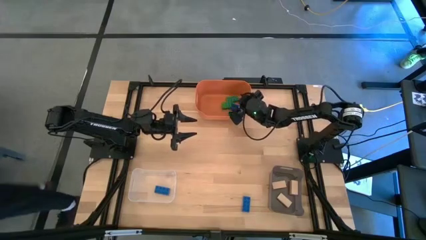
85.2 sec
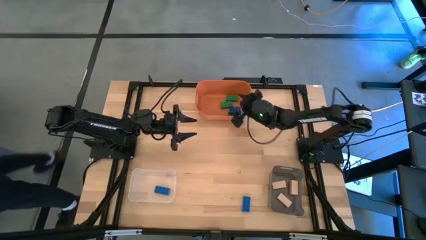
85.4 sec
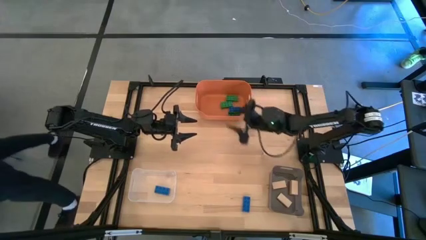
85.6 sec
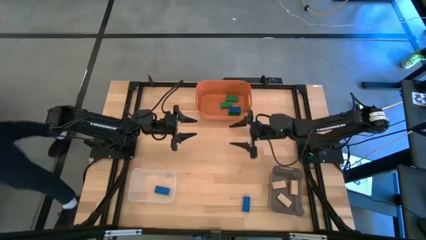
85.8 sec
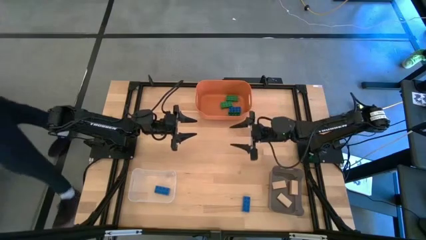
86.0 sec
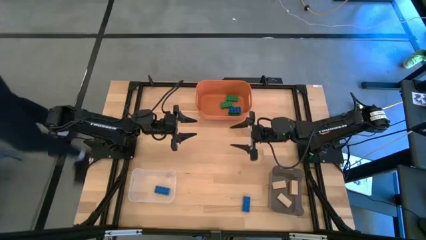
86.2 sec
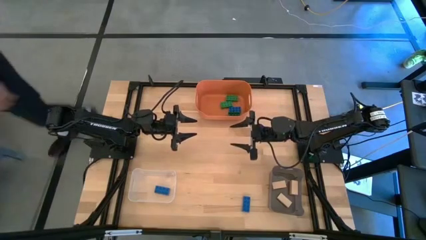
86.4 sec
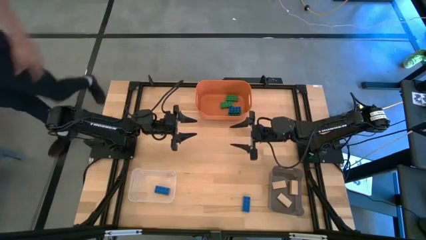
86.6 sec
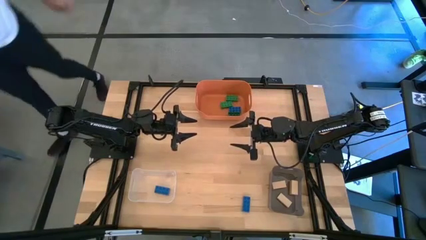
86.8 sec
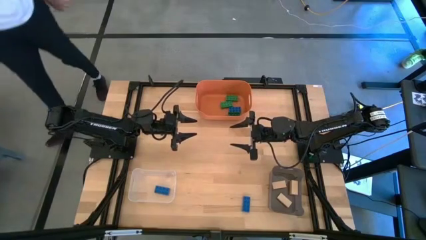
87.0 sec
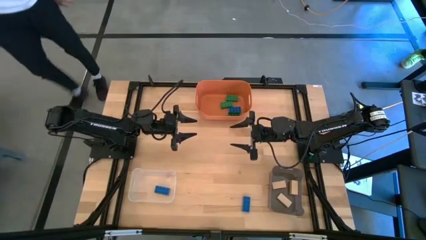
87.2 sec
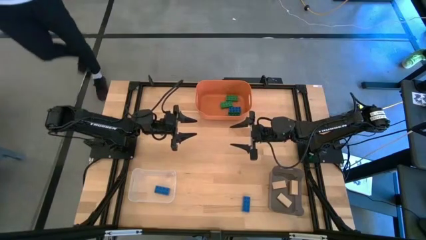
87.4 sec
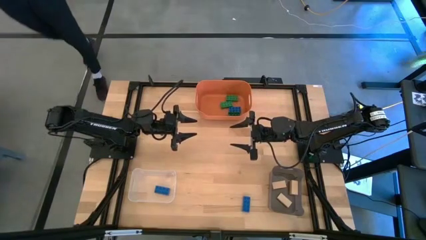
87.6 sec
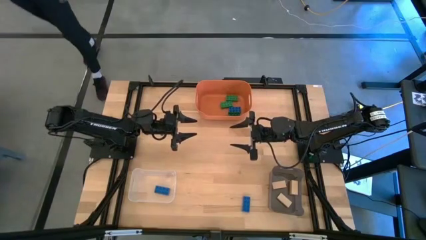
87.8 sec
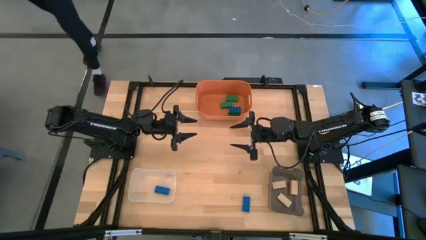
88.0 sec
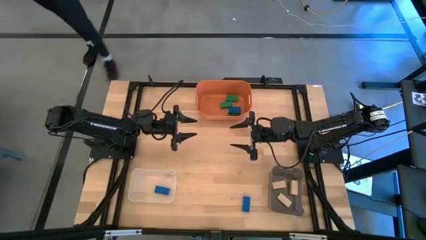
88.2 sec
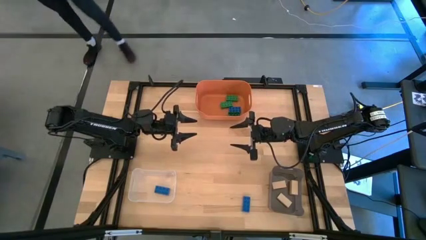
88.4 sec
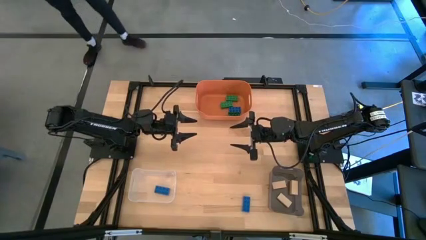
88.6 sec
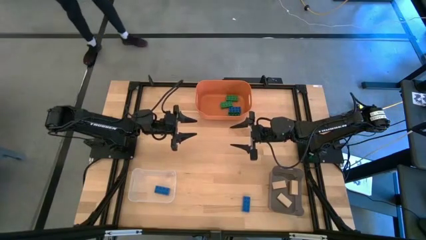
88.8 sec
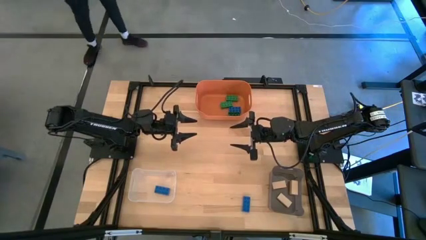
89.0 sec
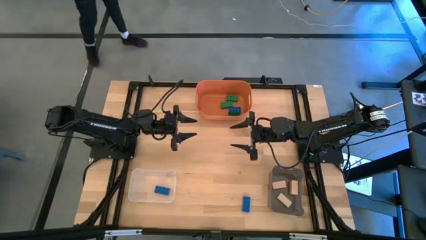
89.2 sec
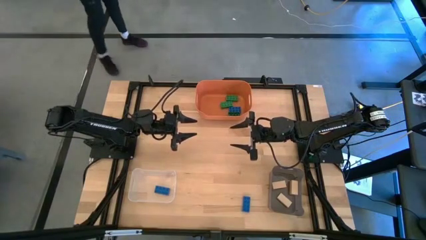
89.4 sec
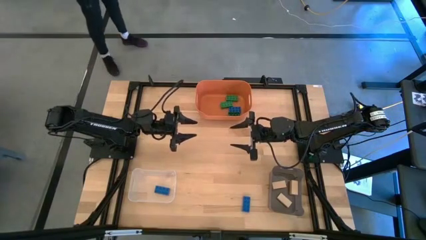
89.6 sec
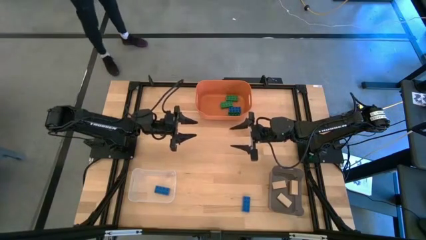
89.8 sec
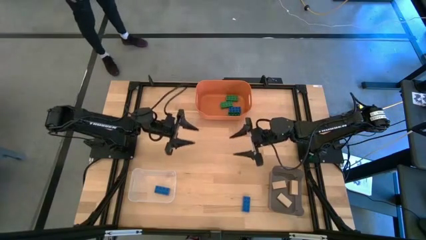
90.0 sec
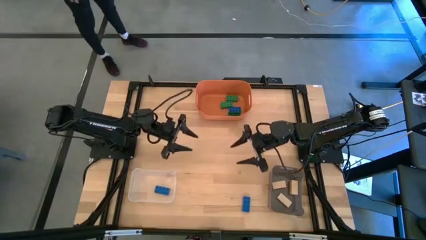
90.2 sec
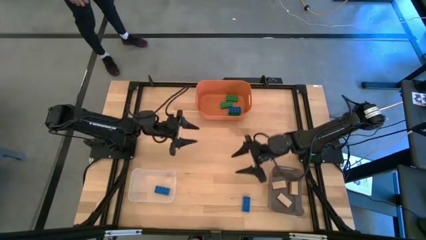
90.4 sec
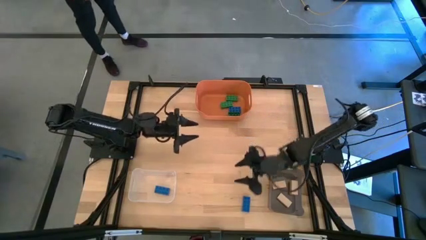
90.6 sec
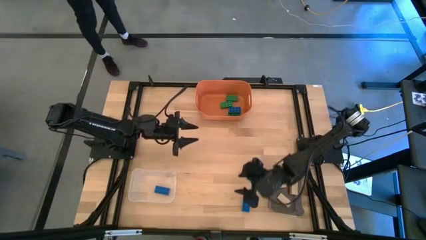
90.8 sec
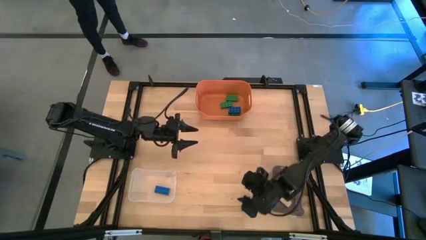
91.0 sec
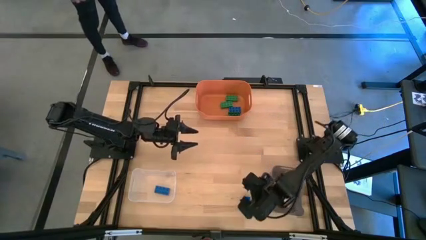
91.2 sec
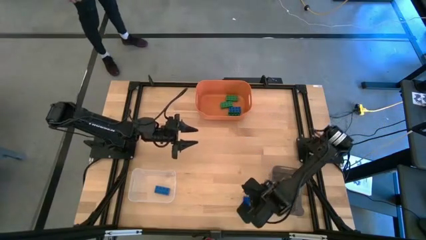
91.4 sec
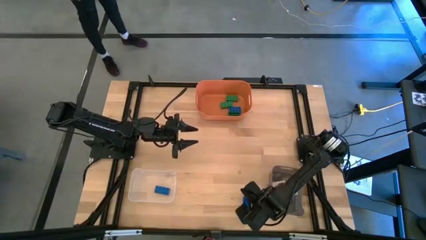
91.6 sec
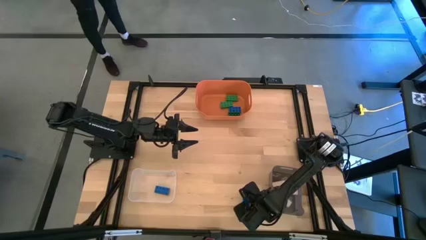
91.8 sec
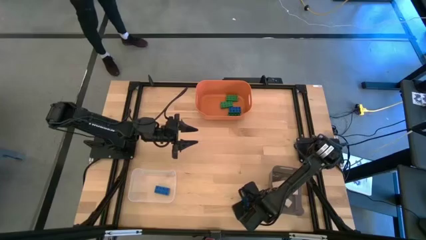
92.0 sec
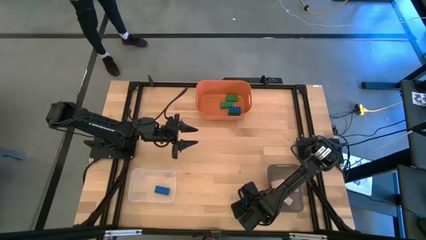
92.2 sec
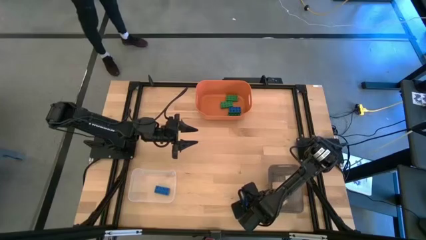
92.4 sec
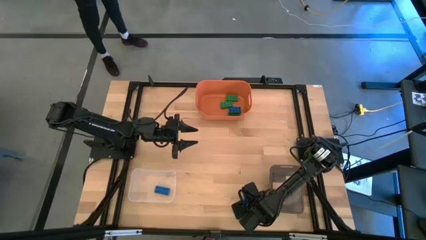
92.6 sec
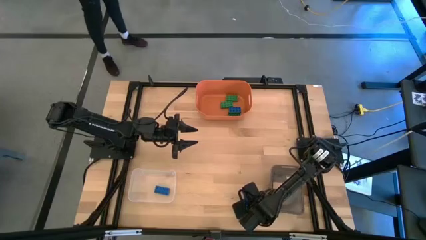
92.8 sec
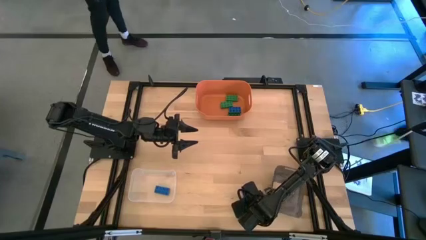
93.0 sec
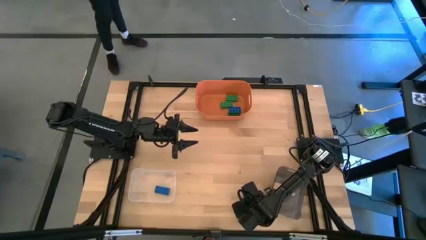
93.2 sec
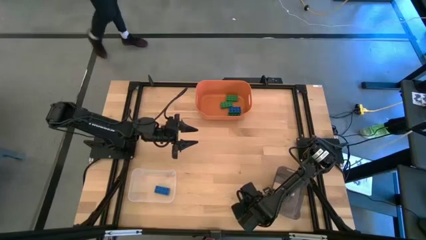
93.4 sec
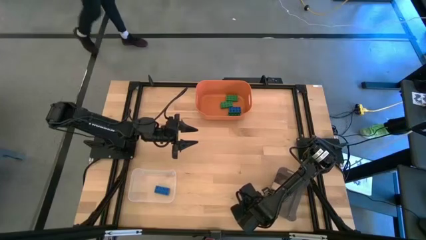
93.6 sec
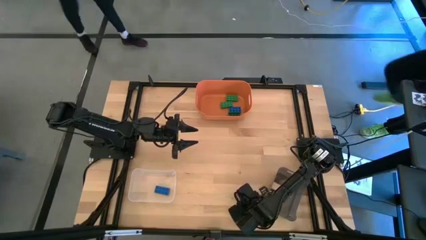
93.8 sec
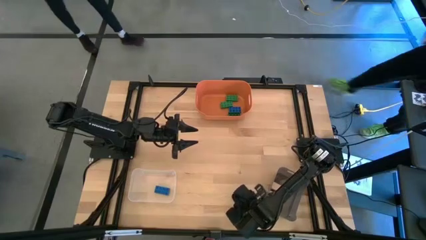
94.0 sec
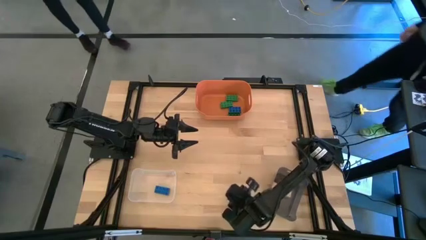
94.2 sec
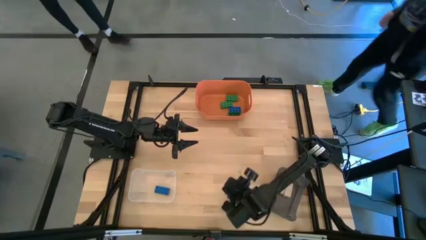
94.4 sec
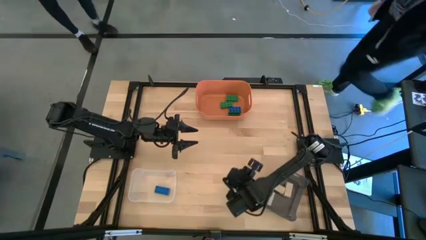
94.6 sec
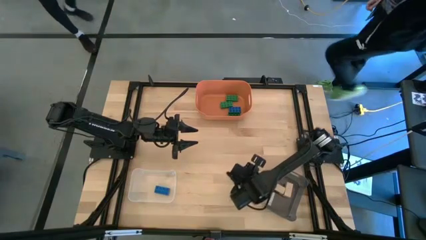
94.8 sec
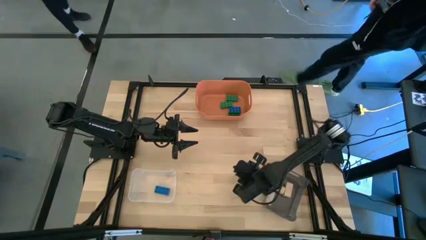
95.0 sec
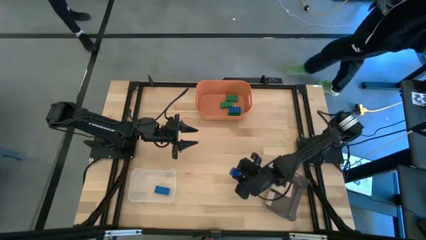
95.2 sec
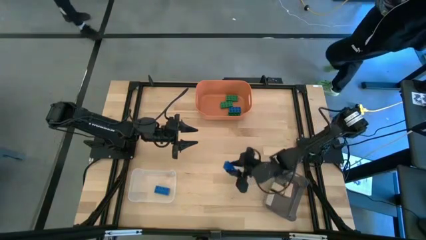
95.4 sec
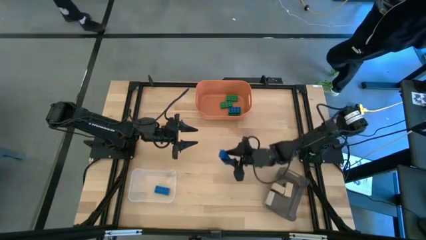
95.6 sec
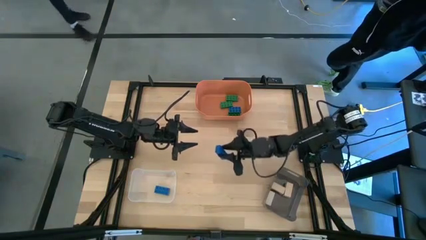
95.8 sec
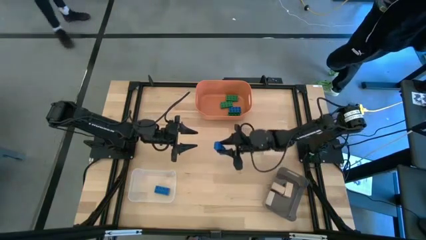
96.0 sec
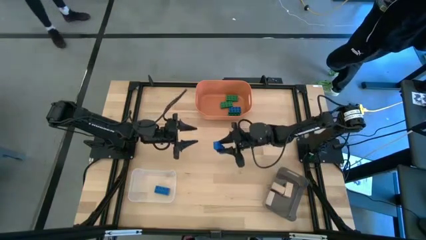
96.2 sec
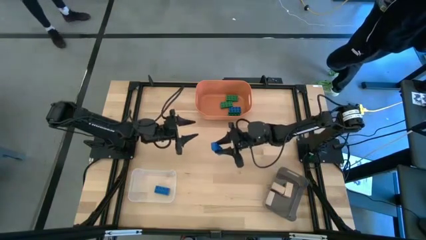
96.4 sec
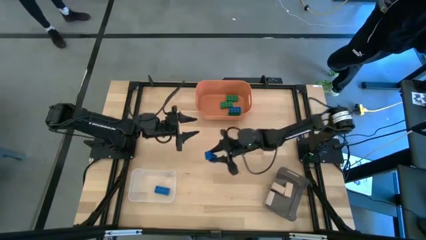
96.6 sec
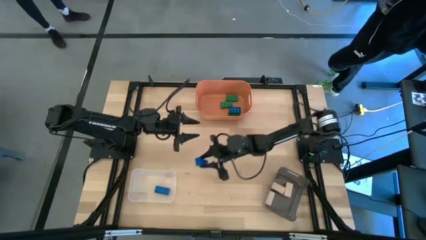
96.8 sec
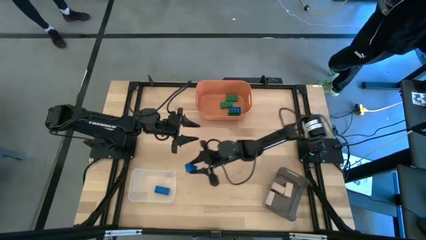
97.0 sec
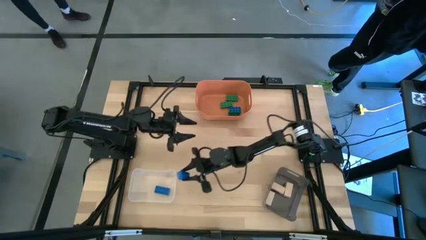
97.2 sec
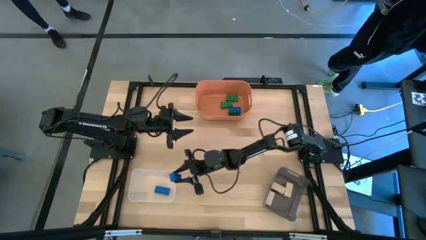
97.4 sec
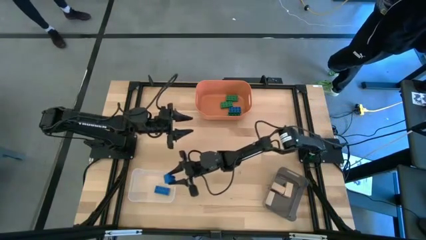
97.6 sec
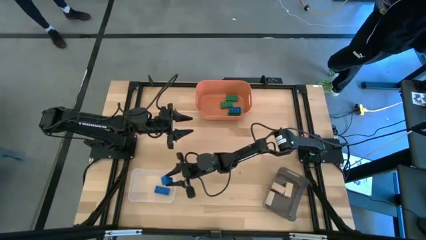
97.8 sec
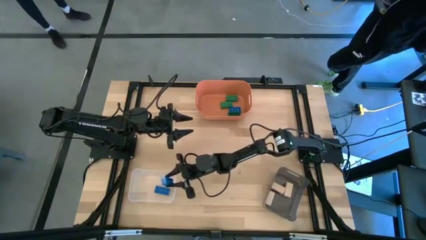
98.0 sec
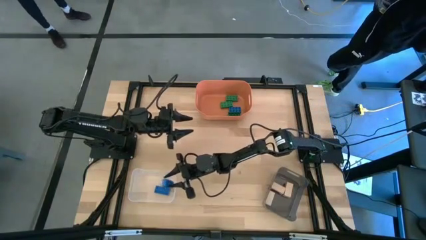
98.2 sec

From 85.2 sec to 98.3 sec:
Task: Sort & place blocks by color
Put the blue 8 stud game piece into the white transparent bin

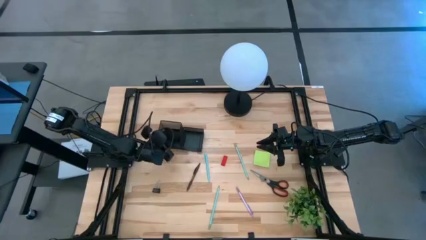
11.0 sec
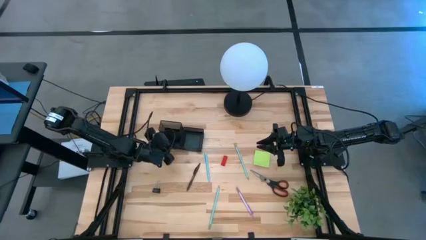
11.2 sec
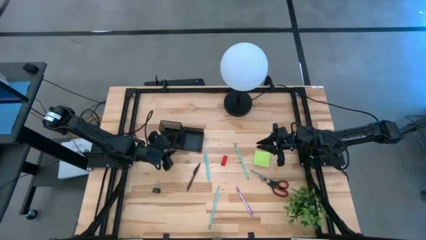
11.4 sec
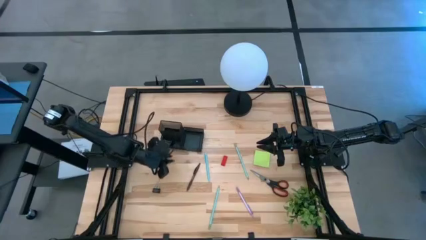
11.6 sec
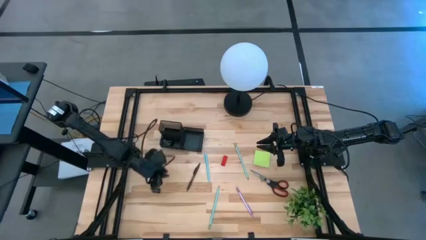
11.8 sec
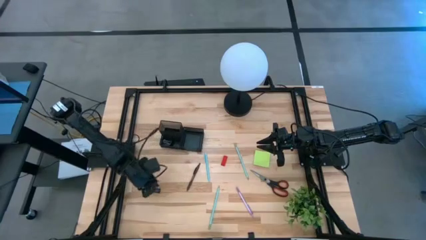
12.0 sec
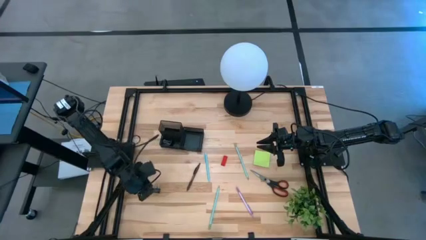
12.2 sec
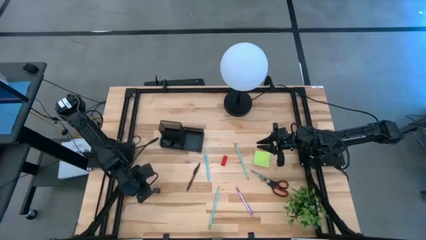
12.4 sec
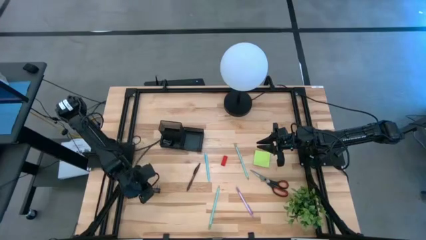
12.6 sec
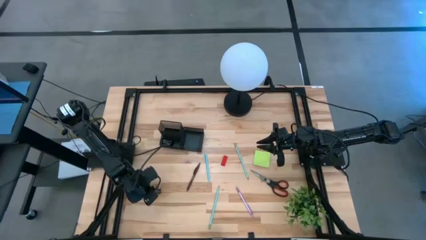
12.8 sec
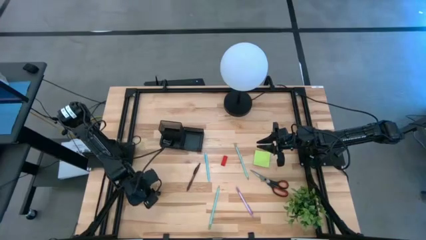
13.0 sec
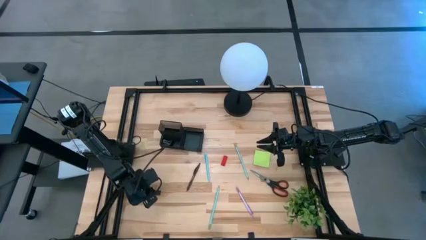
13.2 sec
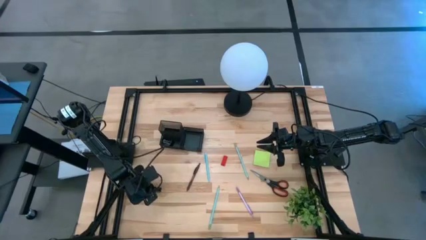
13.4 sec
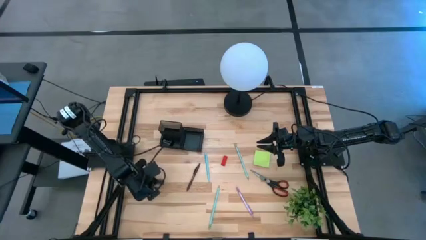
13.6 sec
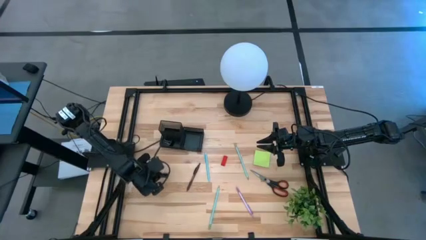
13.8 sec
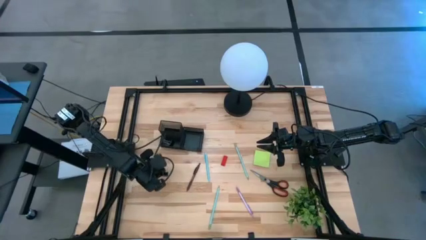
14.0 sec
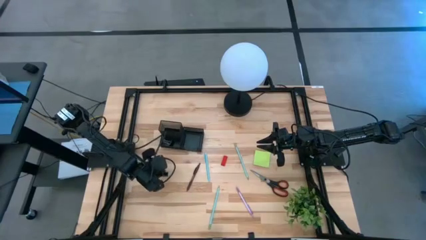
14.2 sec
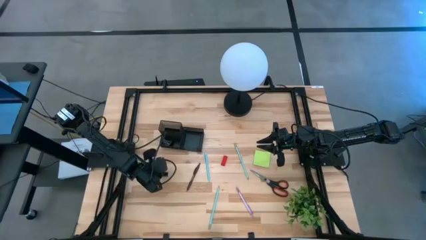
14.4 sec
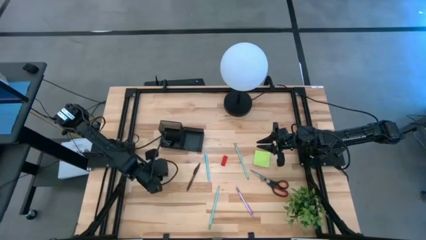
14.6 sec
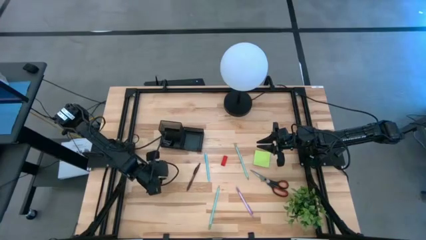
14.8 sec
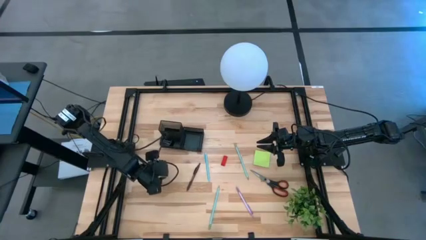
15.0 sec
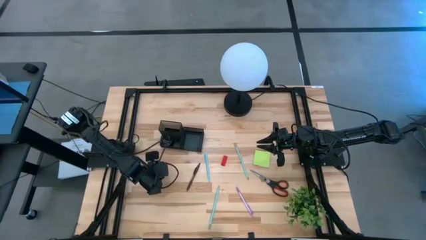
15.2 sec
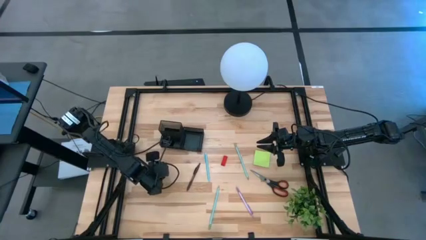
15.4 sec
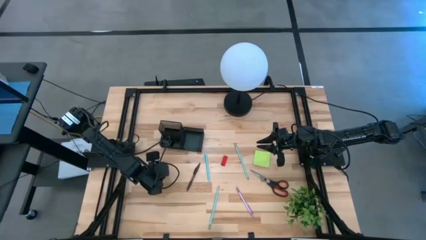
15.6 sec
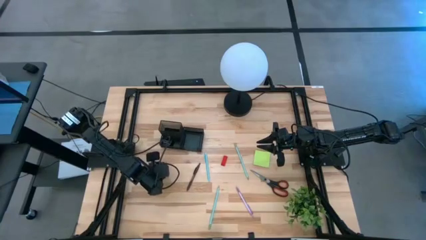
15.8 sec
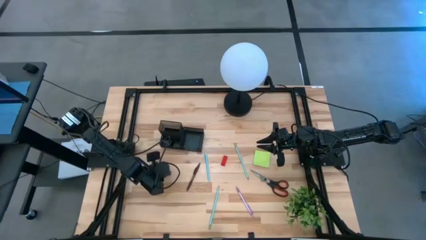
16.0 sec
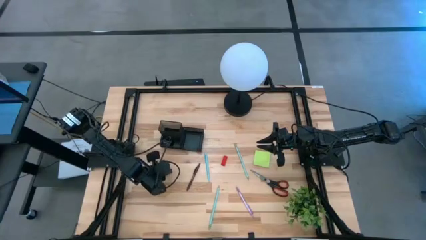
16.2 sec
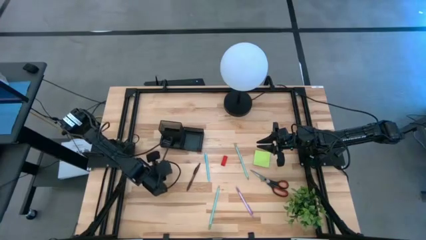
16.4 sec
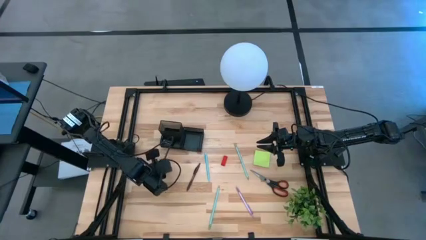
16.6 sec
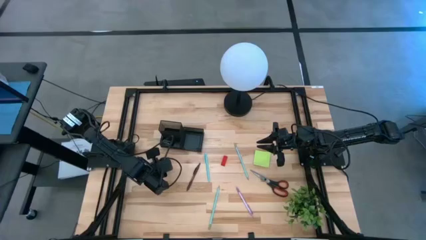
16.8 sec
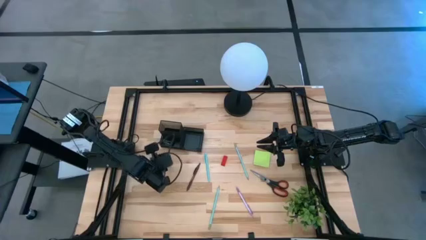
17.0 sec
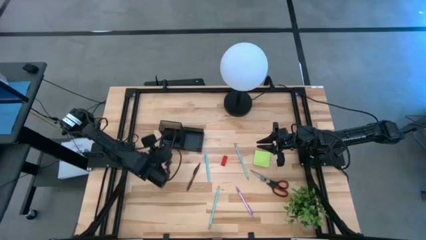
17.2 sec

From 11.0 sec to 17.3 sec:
Task: Pick and place office supplies into organizer
Put the black binder clip into the black desk organizer
